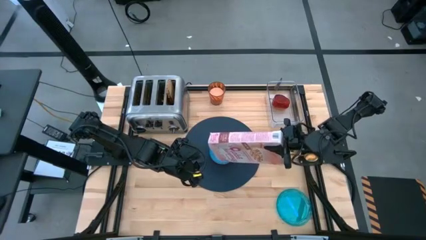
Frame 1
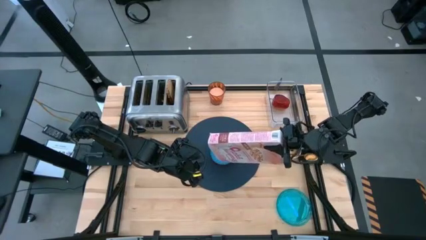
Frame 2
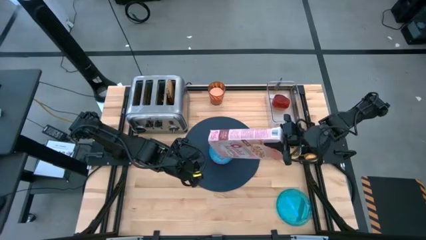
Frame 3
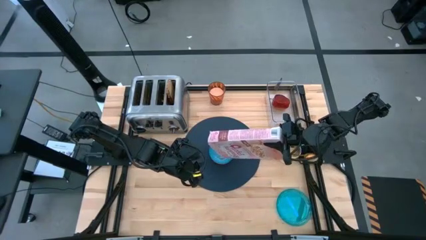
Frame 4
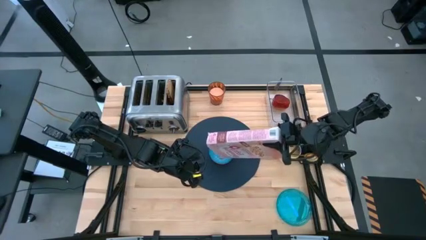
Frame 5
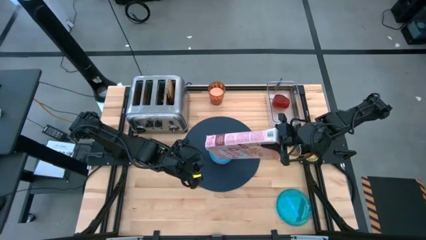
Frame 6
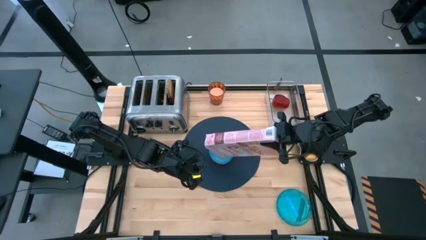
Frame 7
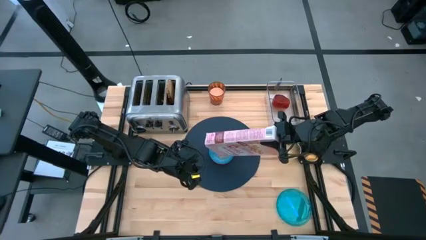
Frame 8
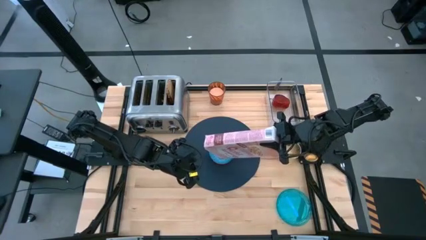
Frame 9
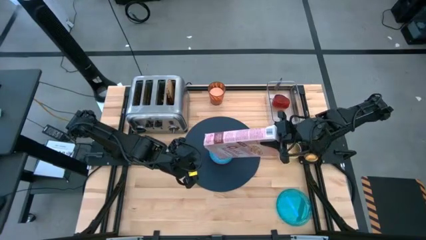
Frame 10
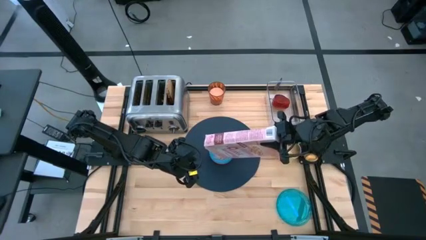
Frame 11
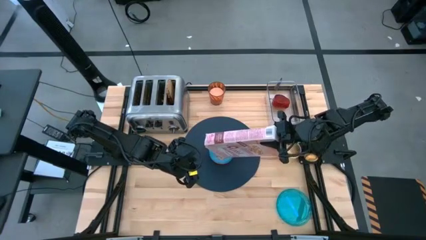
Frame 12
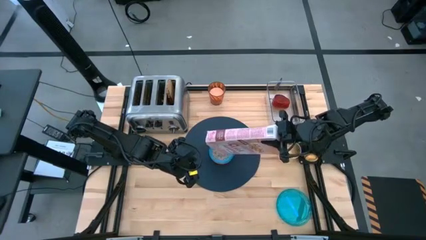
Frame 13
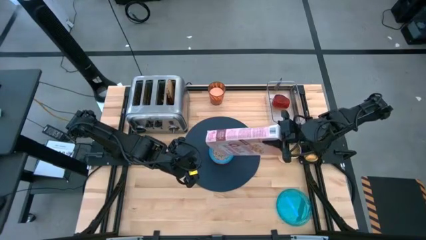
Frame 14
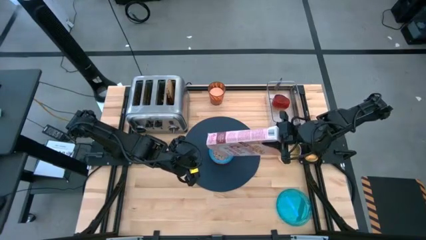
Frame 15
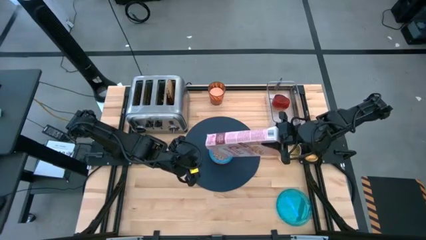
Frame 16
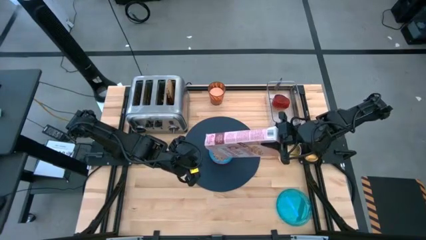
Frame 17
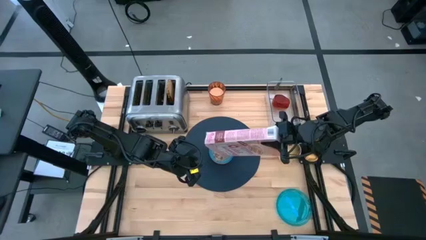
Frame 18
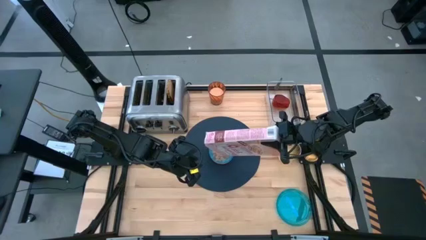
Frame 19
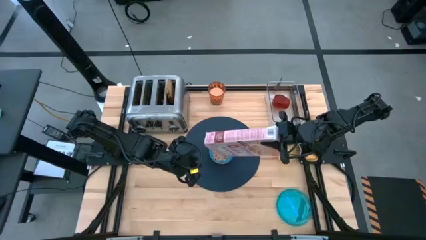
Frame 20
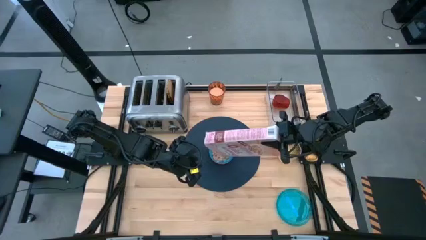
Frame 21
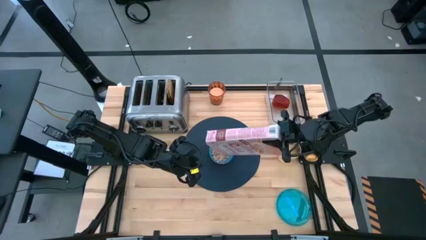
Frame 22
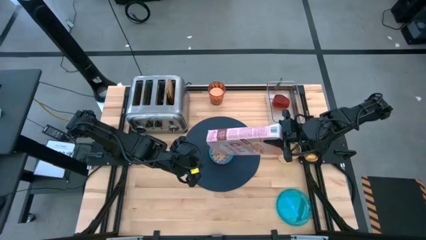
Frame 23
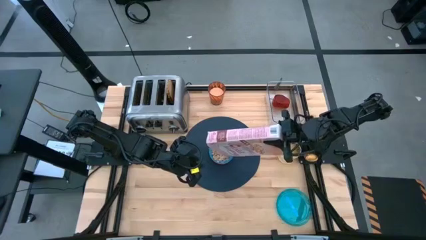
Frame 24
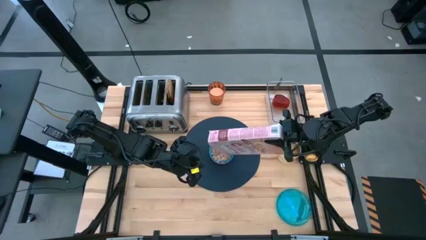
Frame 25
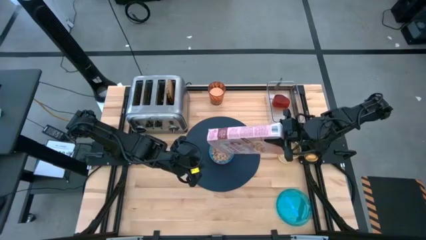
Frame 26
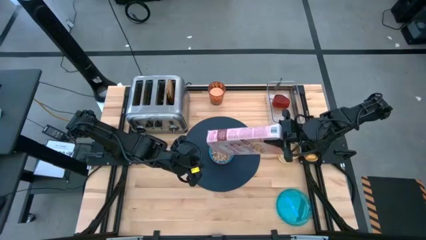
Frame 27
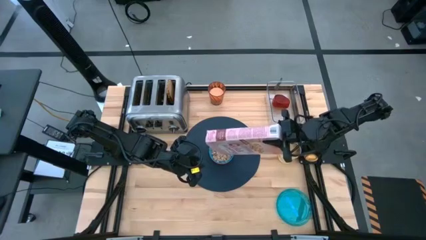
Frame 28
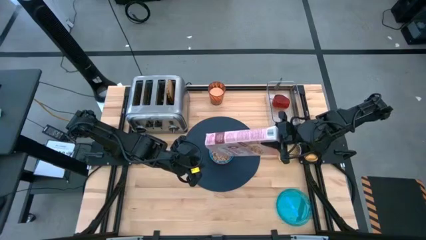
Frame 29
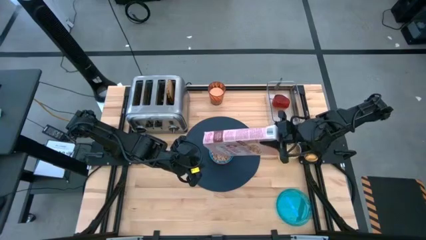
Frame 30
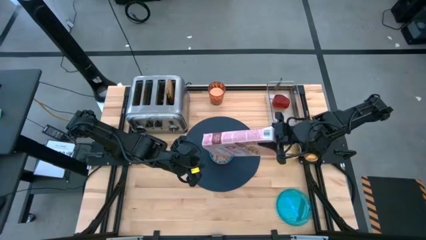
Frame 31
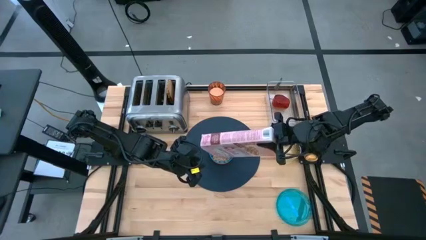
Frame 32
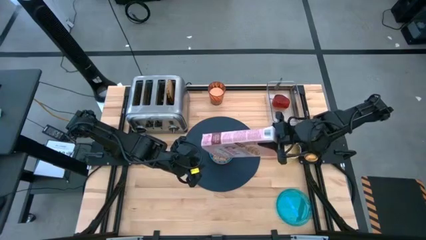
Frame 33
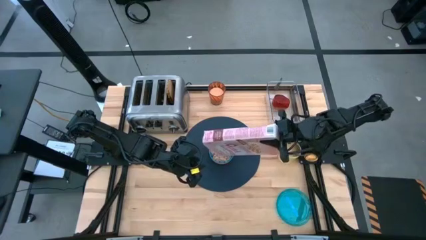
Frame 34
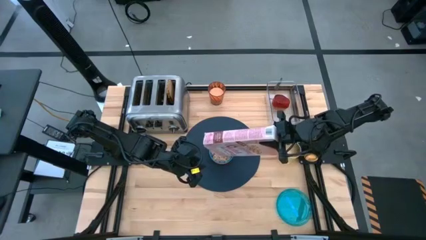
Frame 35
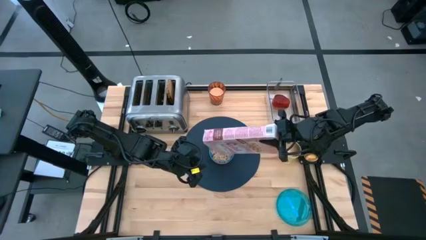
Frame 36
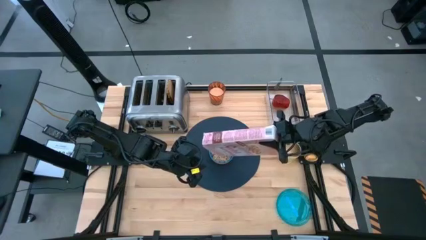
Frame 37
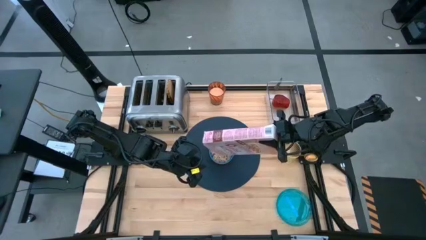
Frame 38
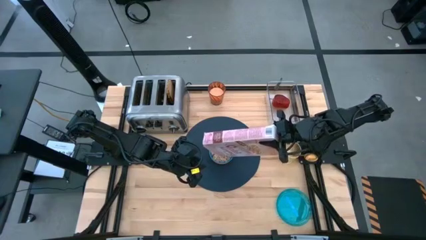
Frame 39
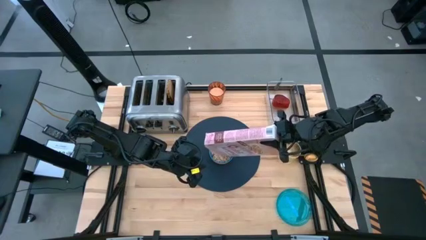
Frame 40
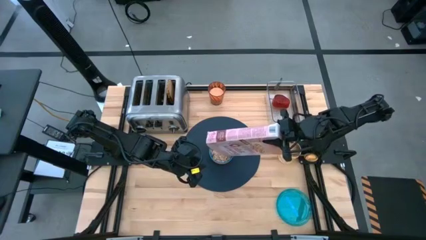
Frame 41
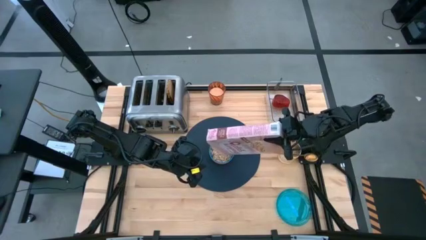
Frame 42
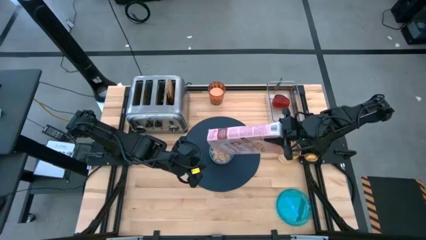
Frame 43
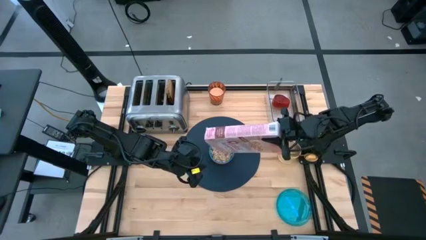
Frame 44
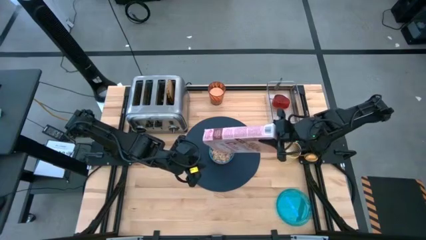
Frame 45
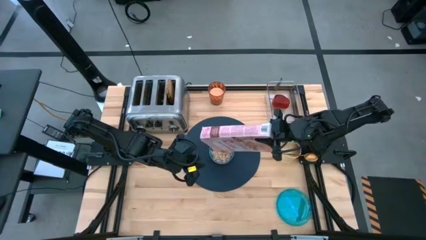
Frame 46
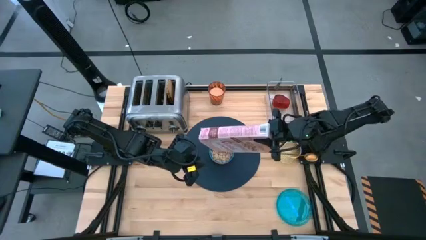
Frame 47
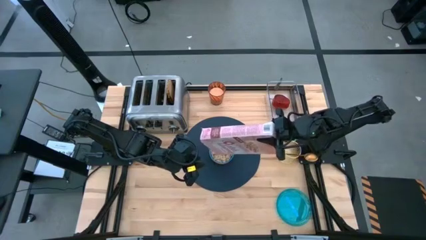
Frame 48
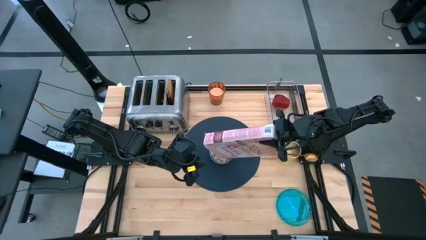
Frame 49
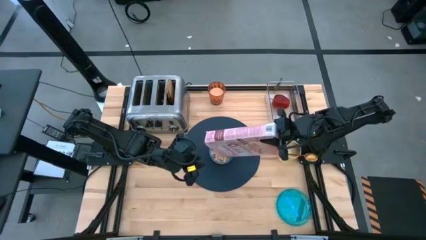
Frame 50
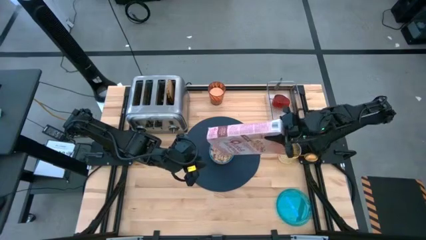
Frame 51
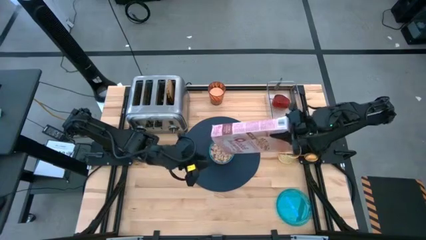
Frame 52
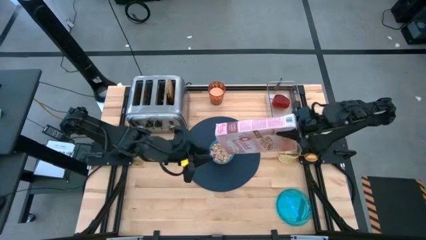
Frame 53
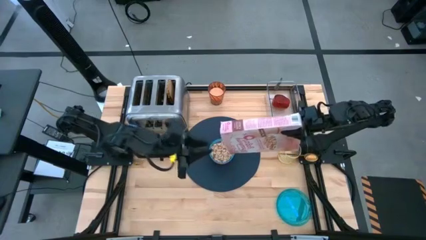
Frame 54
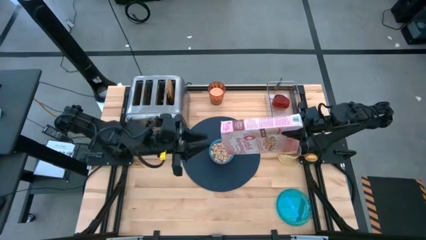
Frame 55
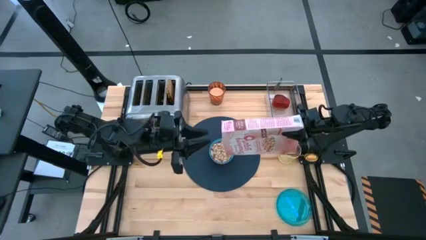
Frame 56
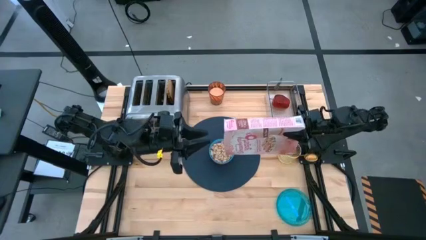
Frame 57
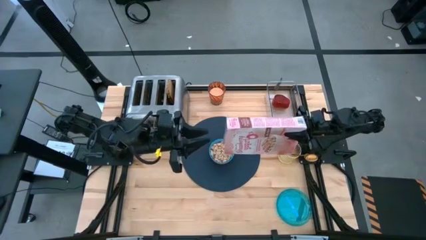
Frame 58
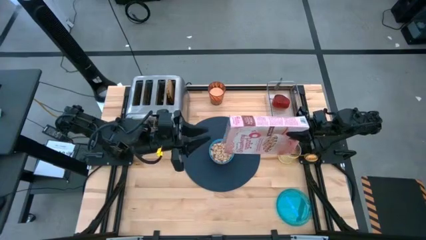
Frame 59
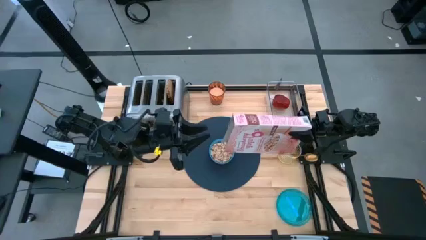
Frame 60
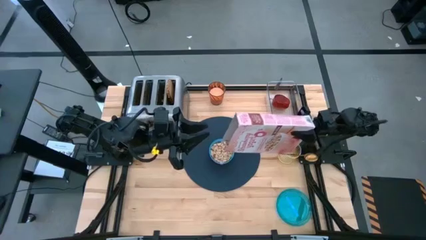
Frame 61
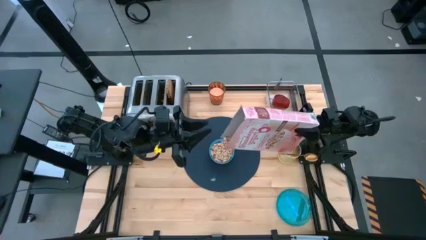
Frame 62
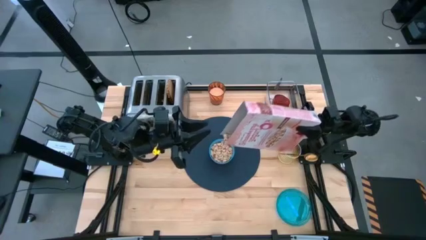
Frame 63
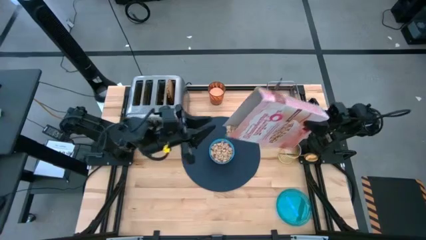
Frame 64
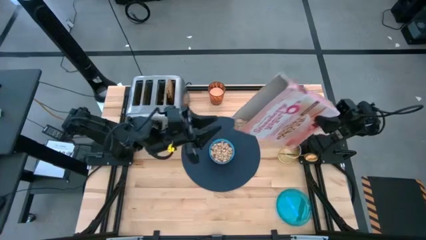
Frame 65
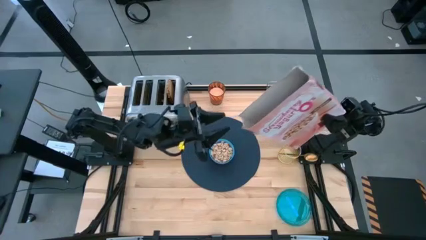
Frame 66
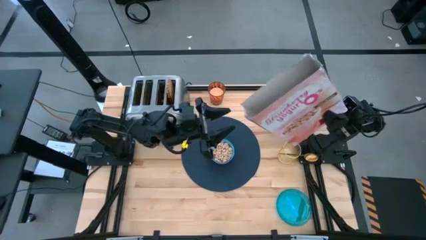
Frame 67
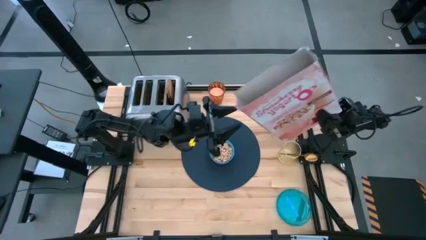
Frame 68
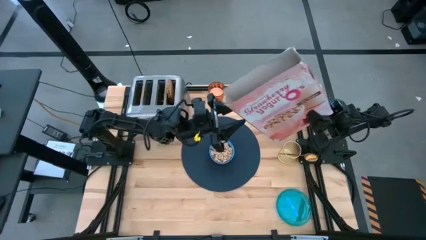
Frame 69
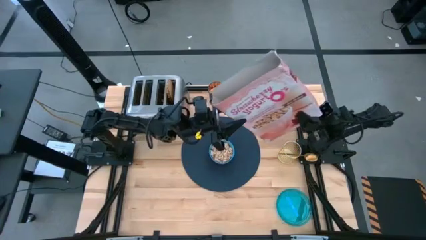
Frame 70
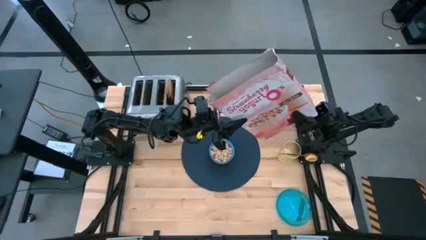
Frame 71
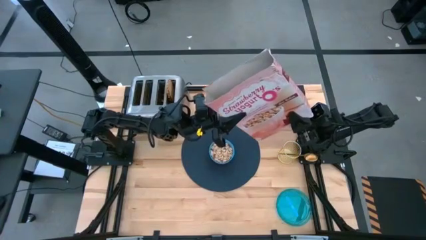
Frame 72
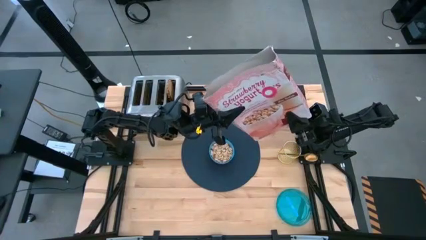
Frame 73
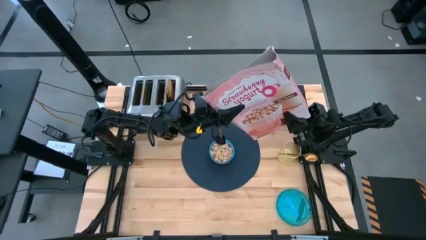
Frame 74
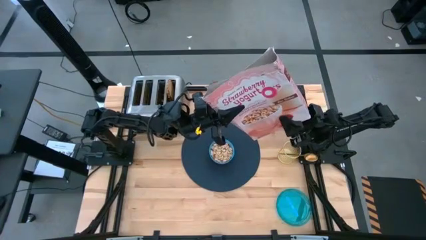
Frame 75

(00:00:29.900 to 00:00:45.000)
Task: Arrange a breakfast setting
Pour the cereal from the cereal box into the blue bowl
